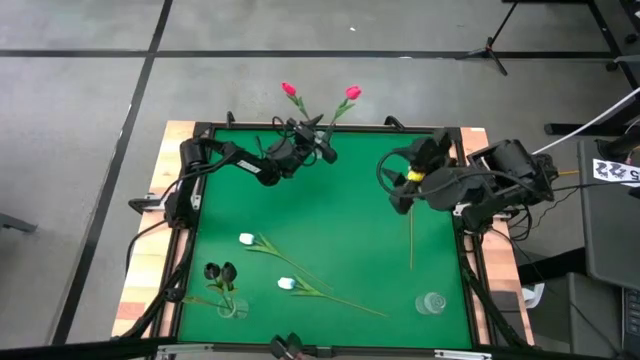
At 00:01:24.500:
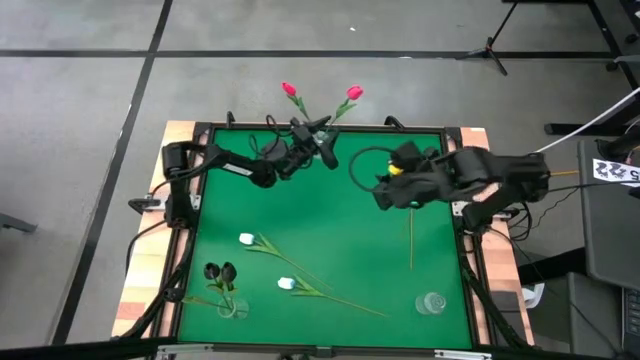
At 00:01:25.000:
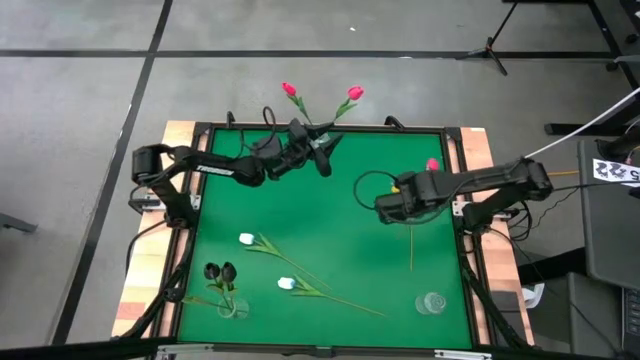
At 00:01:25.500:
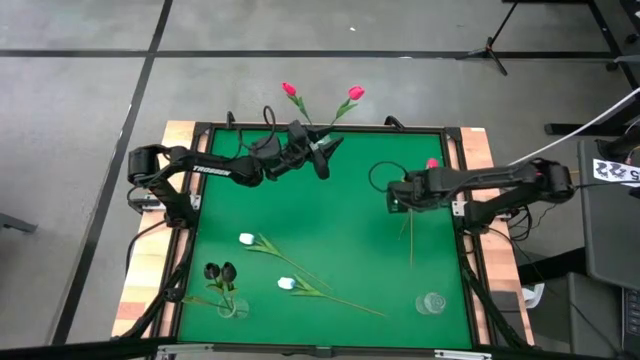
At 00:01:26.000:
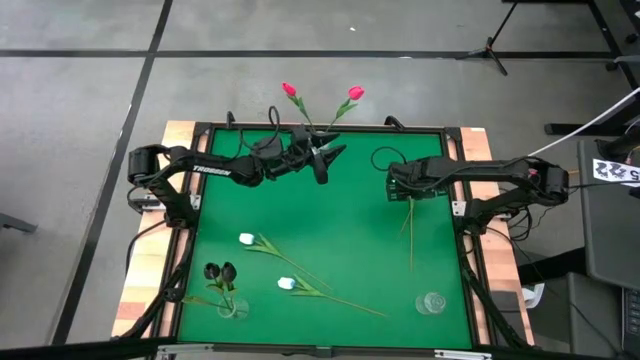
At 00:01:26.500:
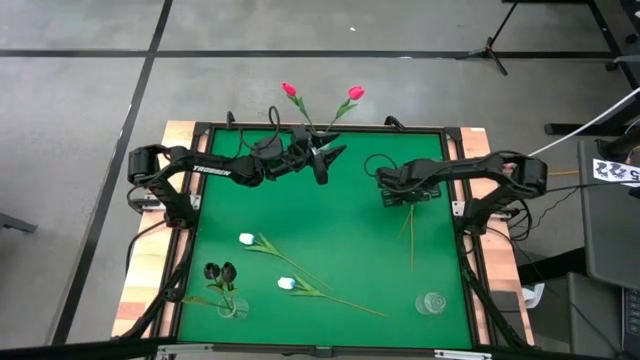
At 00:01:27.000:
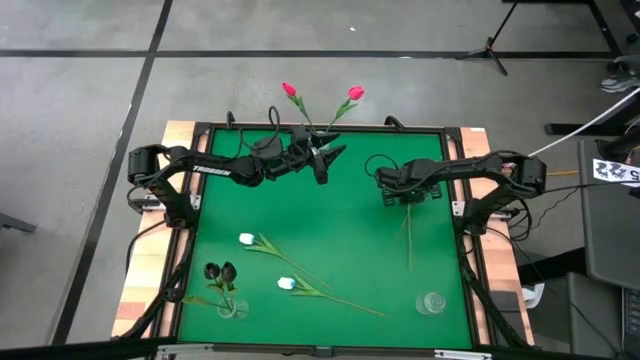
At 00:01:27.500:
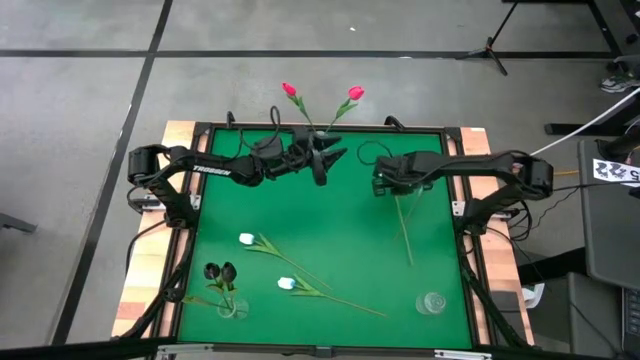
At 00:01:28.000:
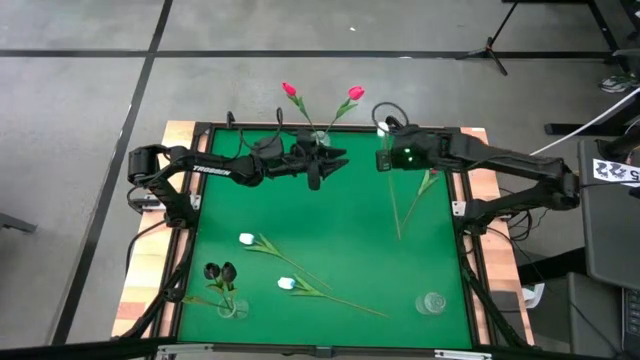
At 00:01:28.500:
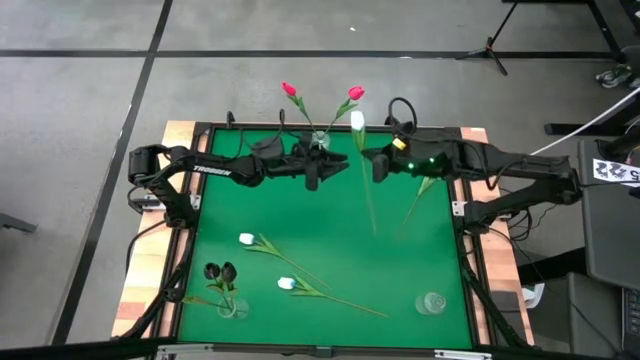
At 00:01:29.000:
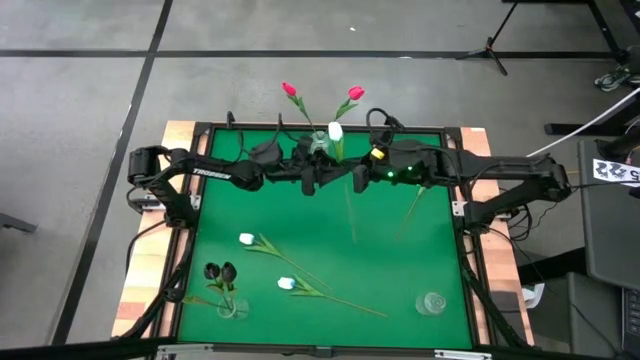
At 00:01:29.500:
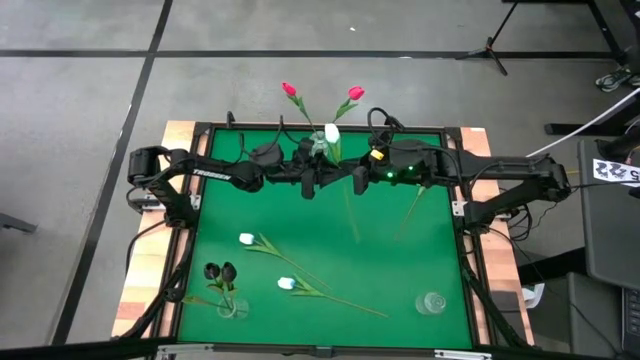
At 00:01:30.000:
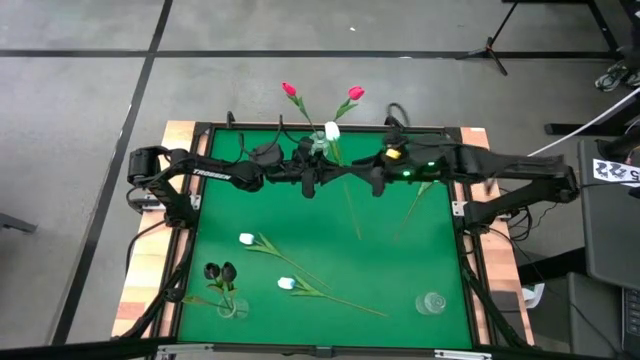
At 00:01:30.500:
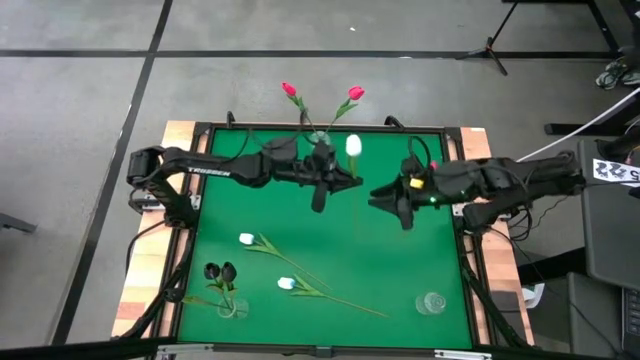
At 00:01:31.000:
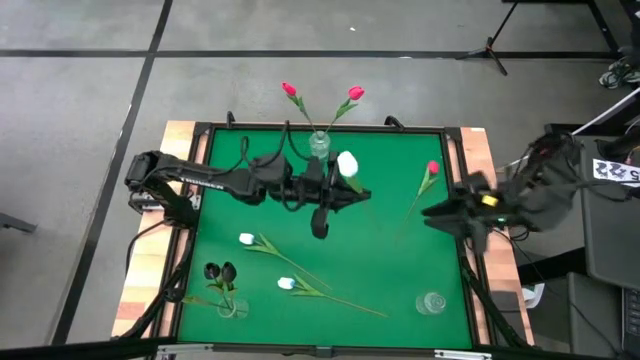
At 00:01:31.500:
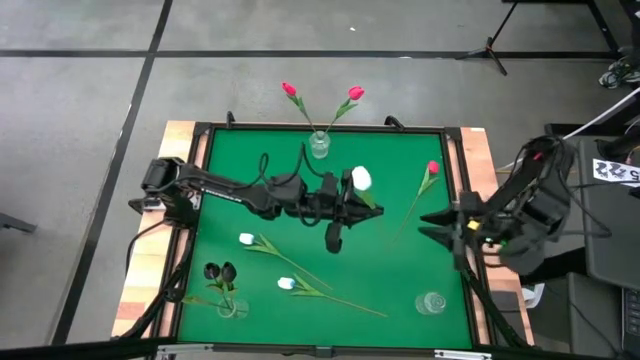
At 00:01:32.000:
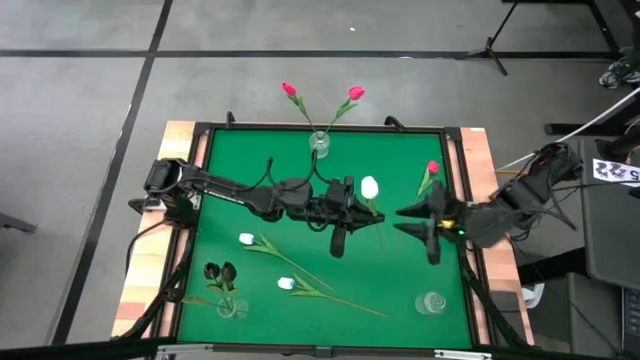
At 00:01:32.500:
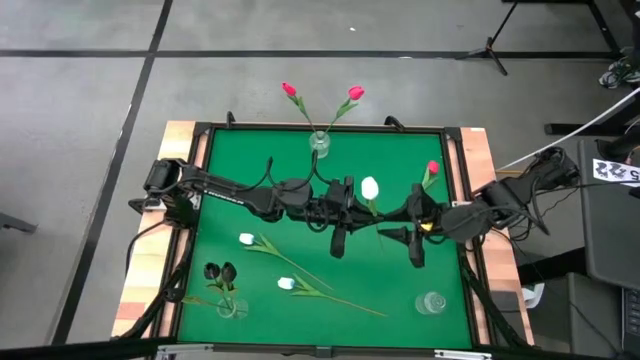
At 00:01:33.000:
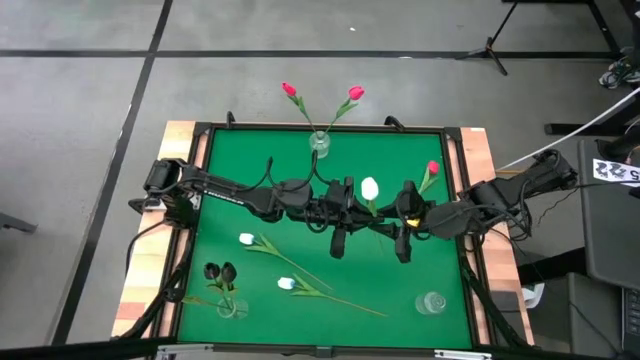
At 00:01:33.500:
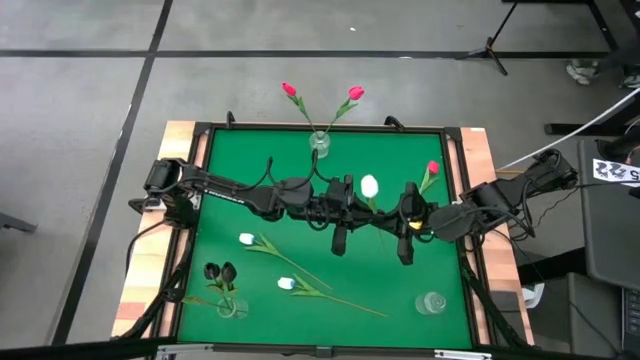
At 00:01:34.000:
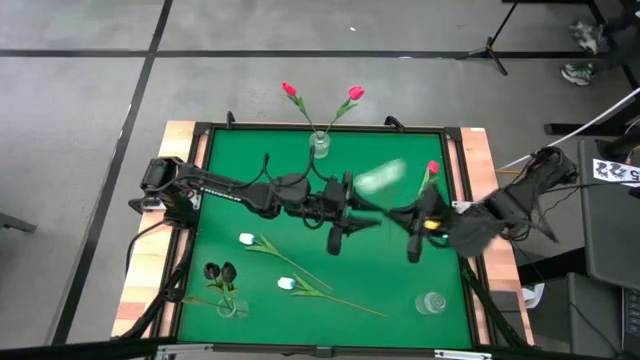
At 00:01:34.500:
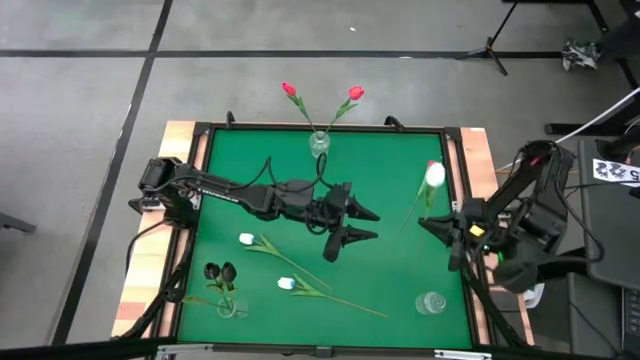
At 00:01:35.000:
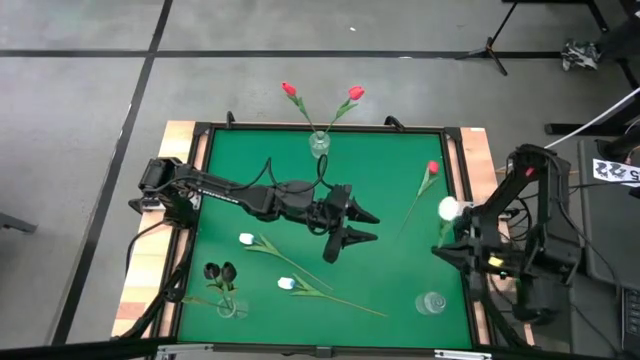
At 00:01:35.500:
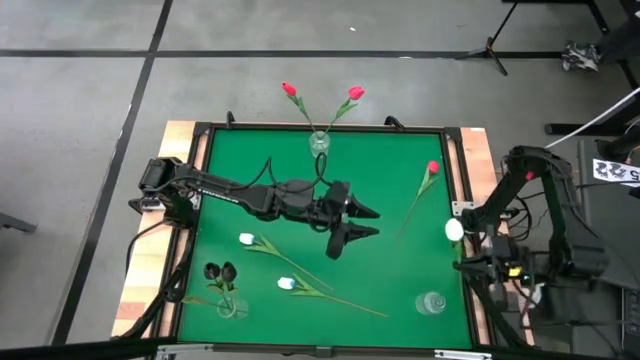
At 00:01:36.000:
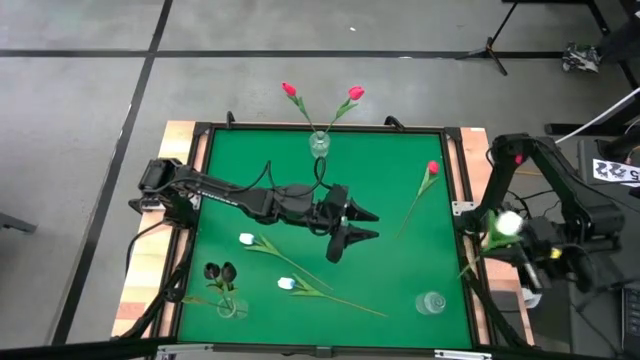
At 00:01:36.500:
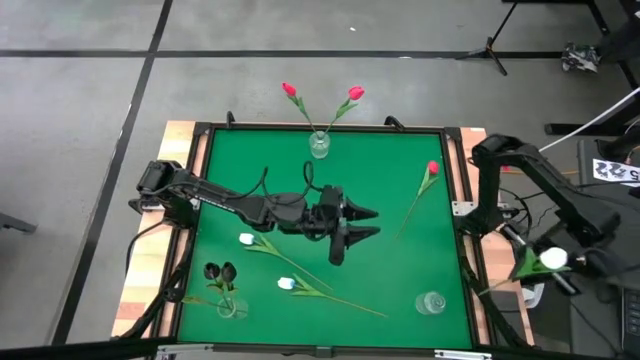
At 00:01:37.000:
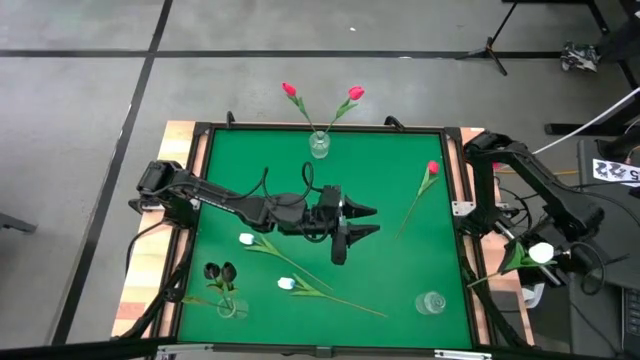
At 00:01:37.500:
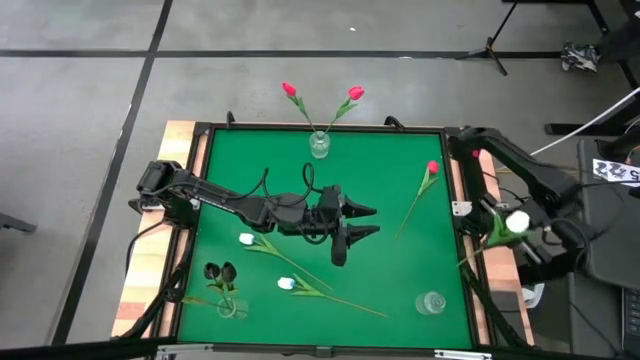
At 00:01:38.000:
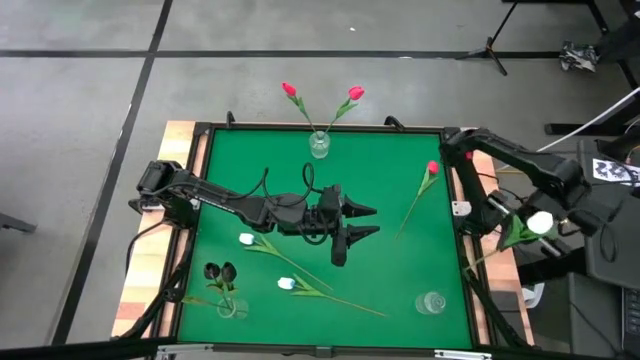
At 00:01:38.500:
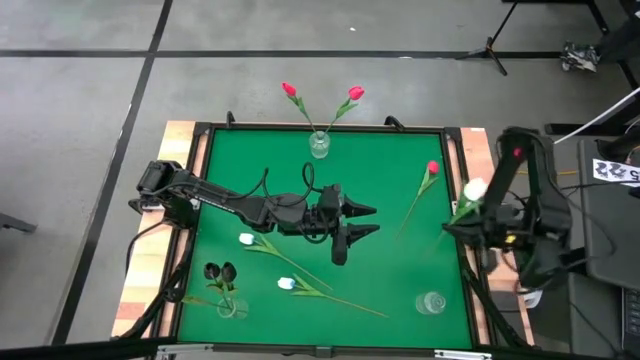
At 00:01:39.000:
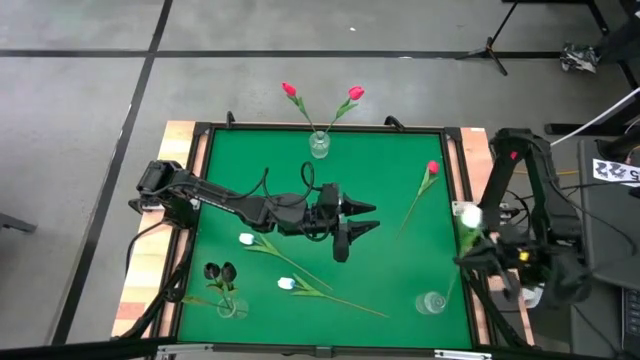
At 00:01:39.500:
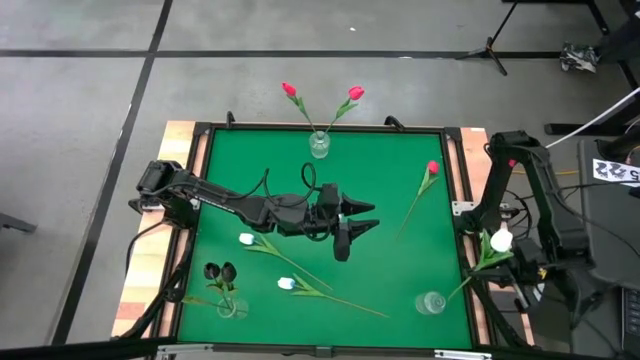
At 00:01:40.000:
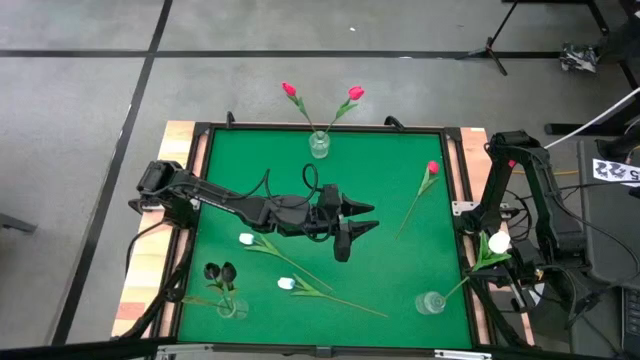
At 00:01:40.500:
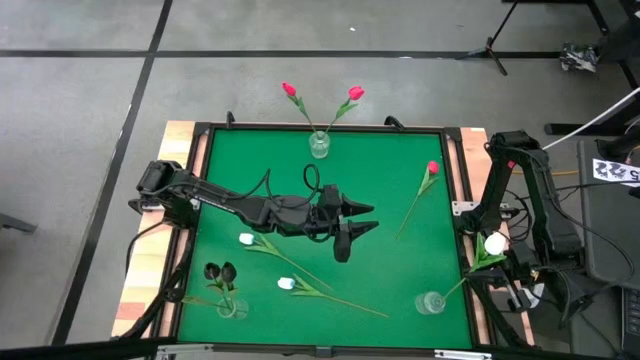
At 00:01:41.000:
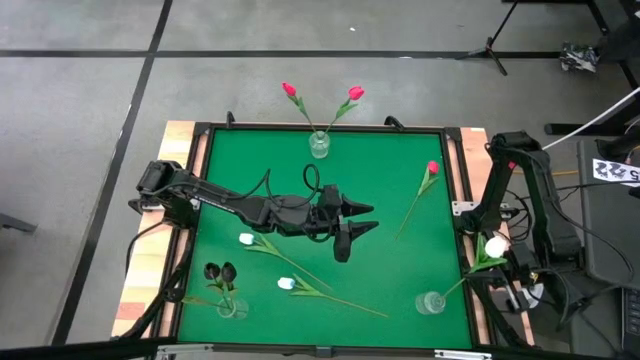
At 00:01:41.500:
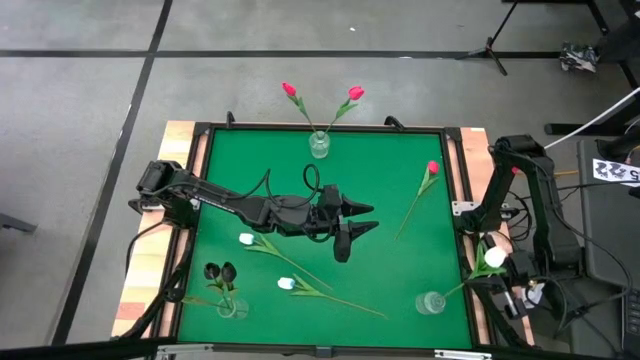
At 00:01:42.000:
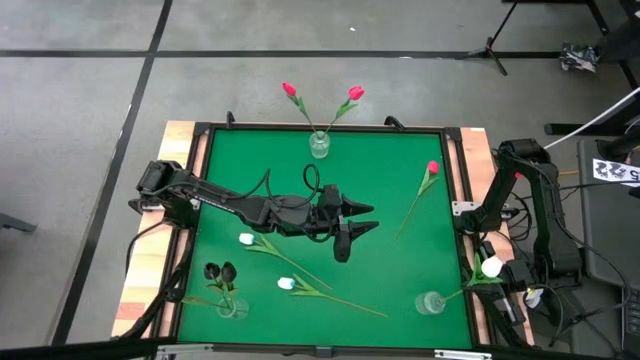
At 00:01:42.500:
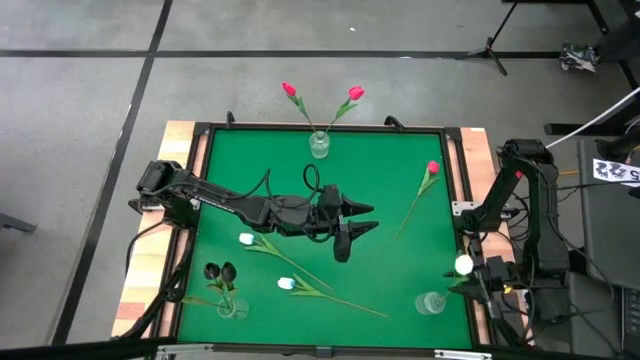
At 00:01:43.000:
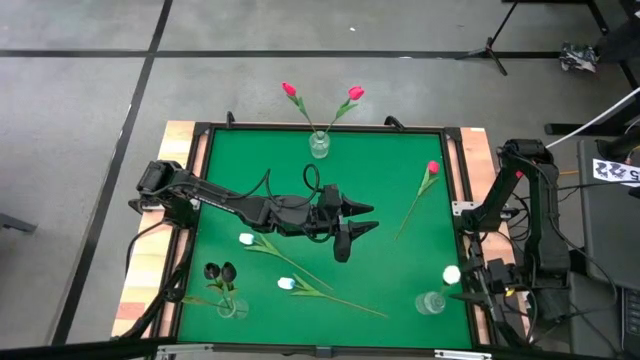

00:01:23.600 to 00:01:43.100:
Task: Sort flowers into vase by color
Put the top white flower into the bottom right transparent vase

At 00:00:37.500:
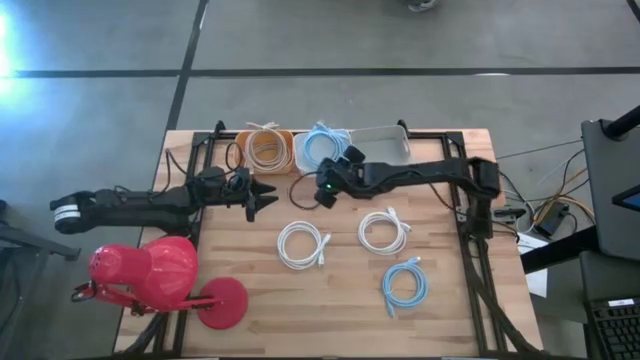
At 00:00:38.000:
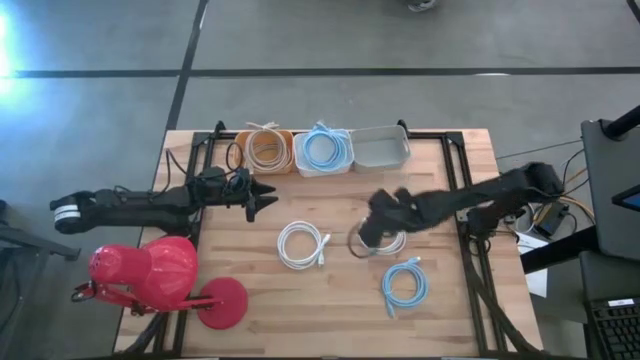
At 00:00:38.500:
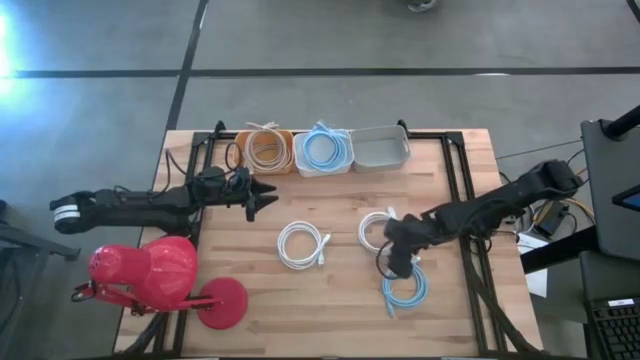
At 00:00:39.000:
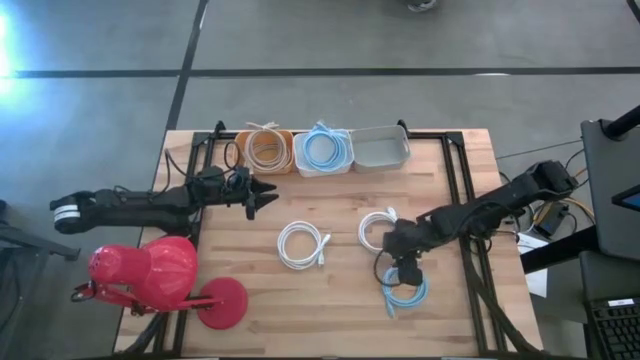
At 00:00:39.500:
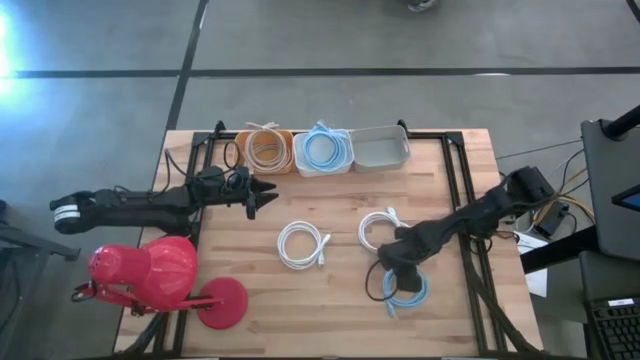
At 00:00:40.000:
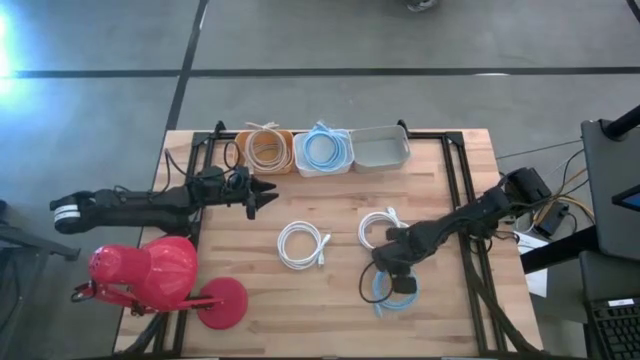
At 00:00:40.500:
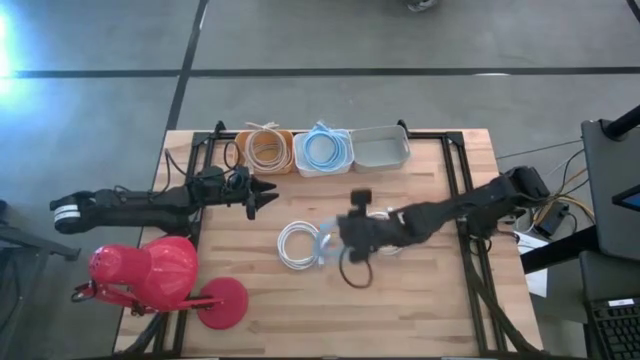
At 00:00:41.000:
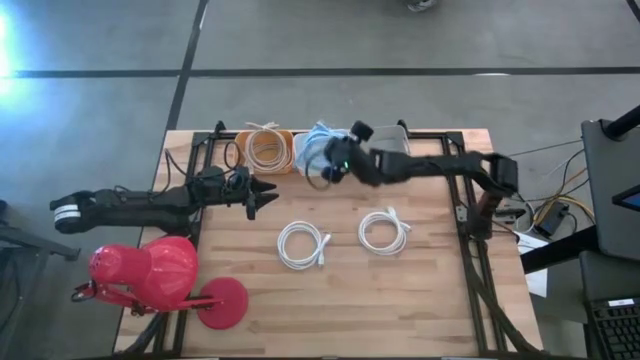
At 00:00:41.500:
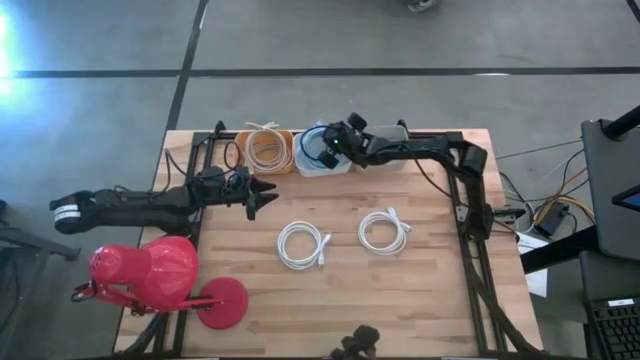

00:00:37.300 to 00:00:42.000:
Task: Sort HDMI cables
Put the blue hdmi cable into the white bin
